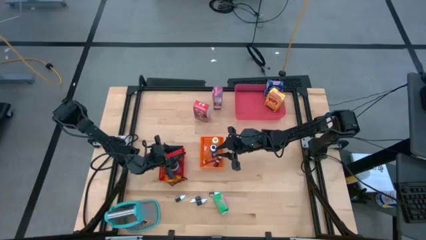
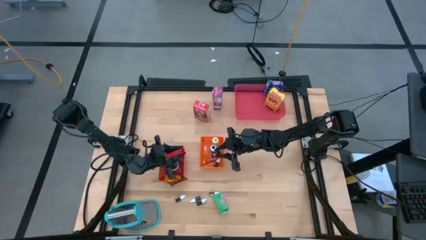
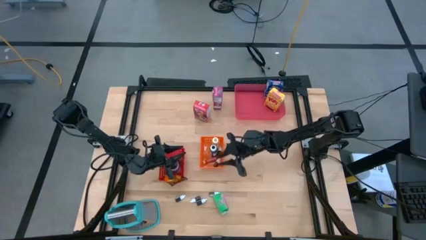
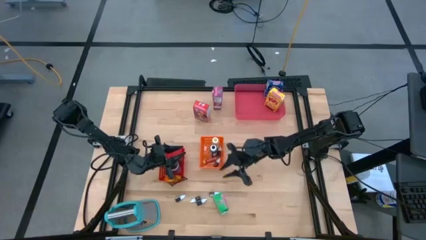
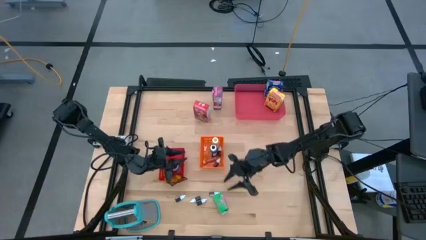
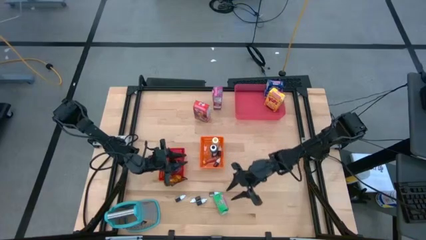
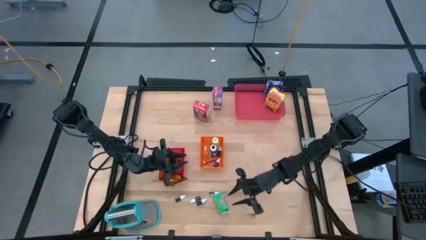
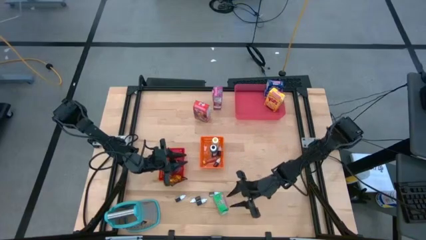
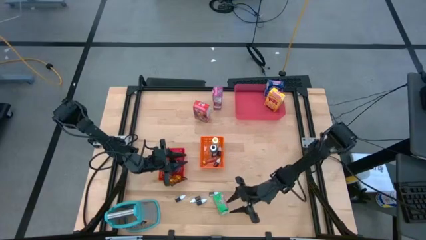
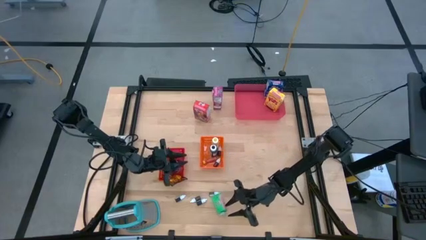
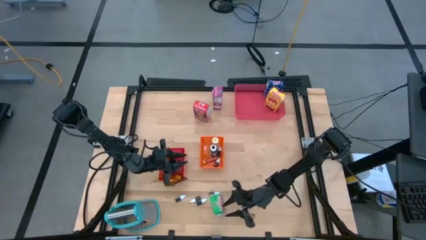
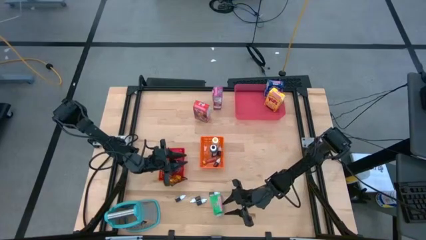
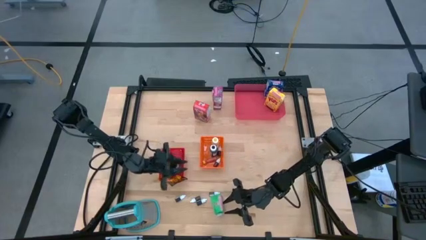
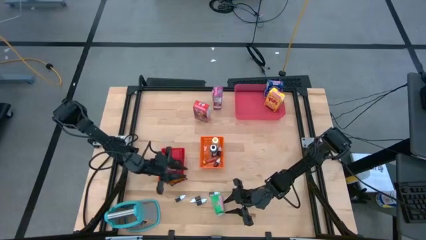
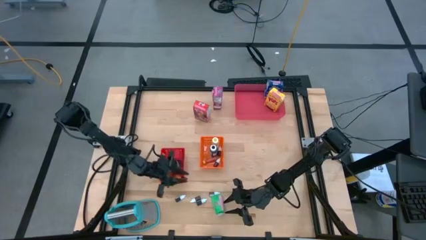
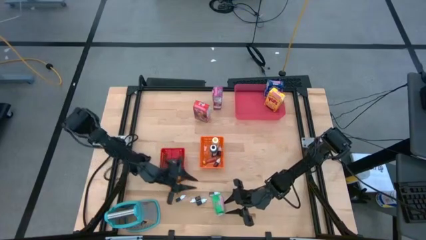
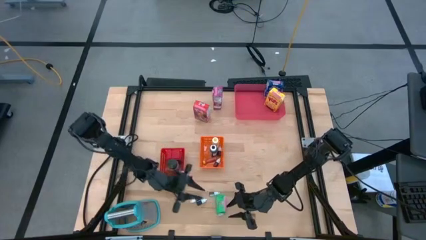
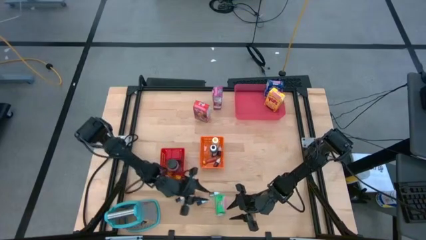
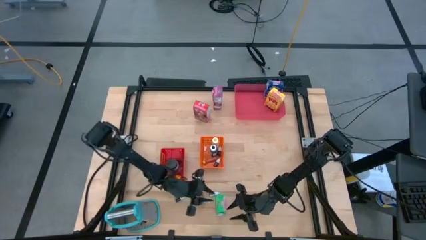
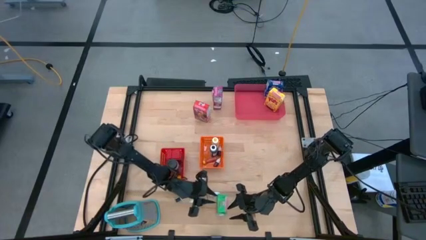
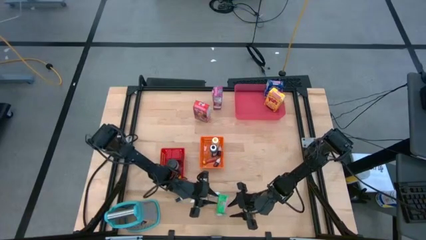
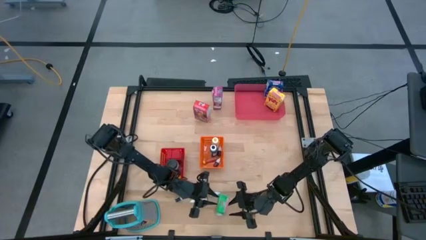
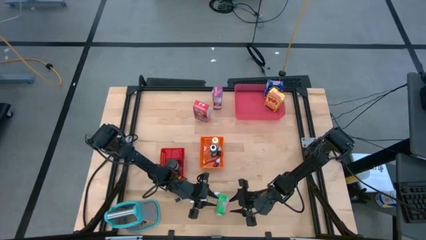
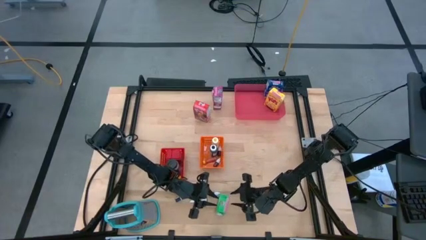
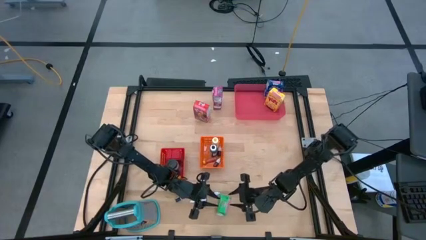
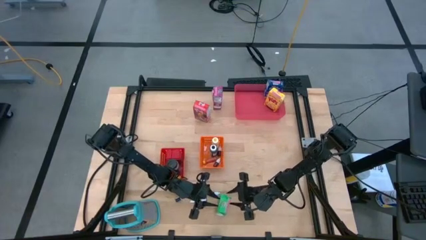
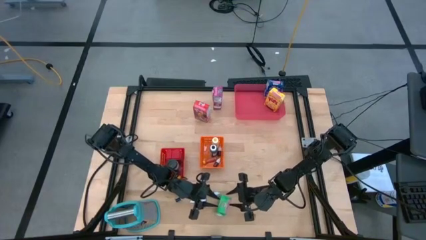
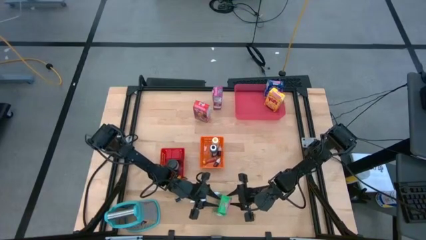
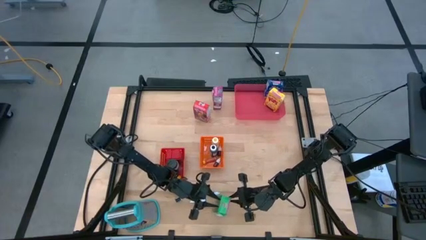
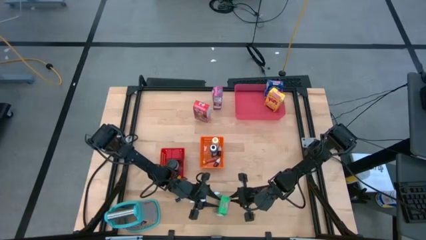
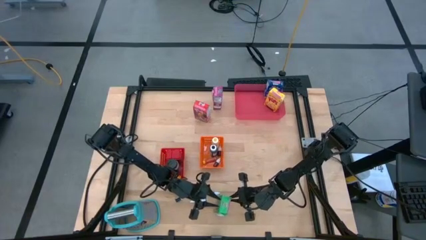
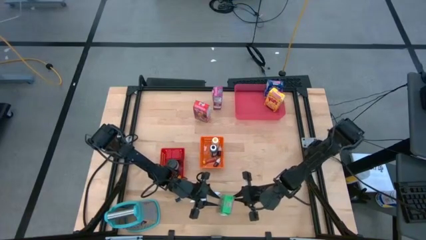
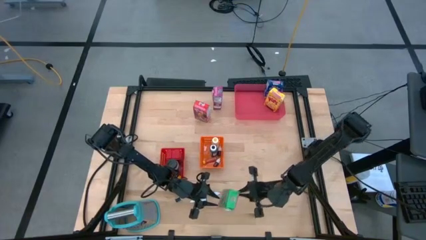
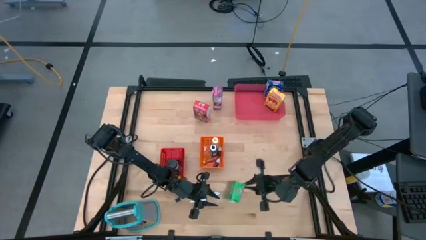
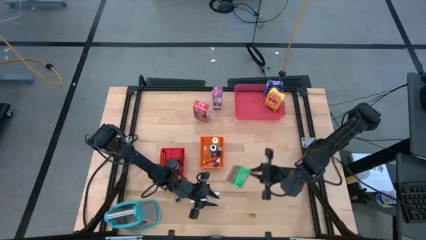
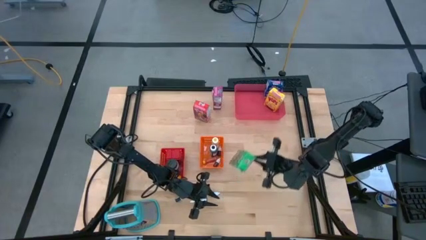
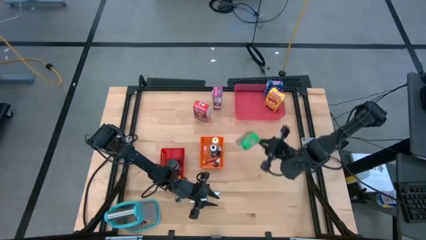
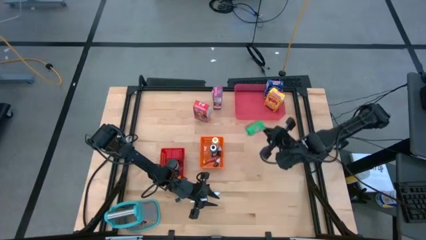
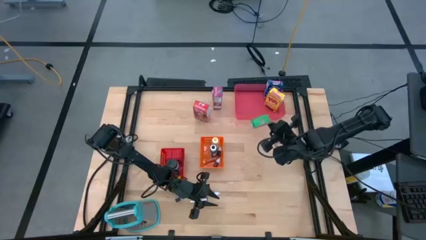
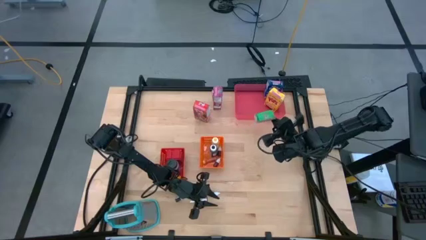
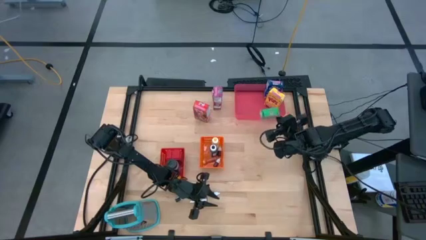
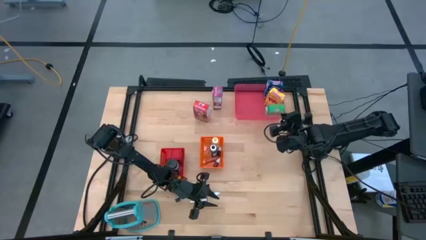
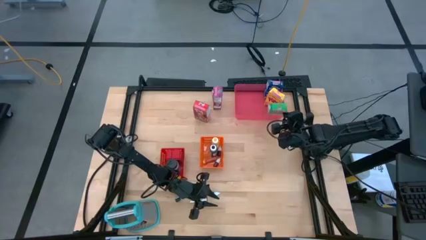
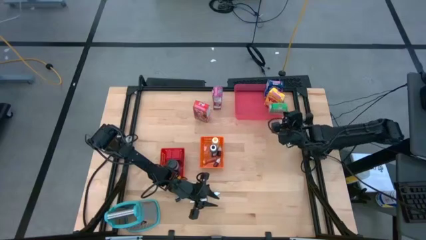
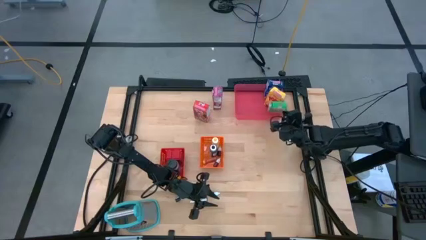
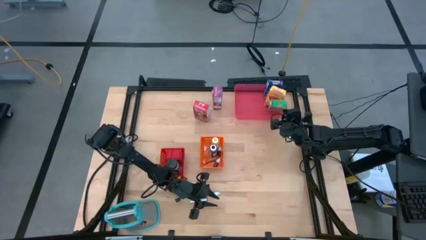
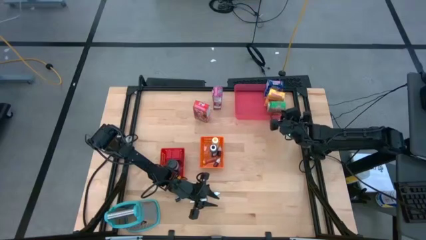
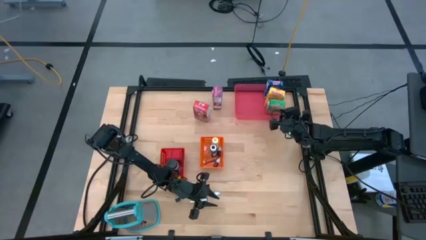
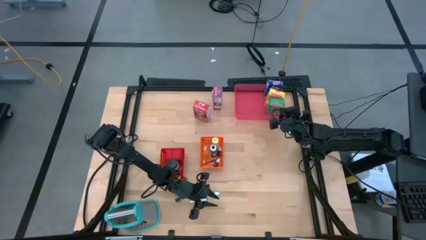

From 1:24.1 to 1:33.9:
Task: Pick & Place Kitchen Items
Put the green cereal box into the light red bin

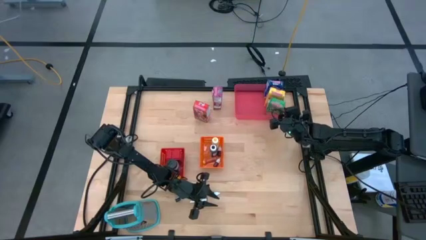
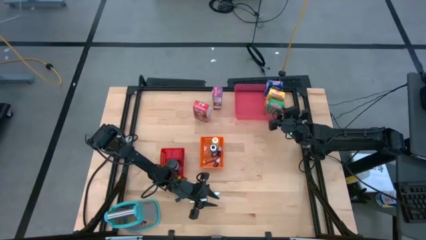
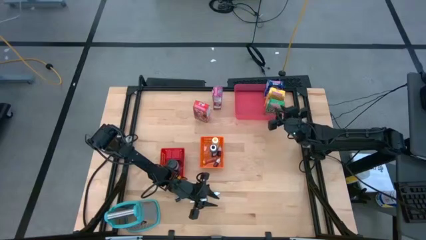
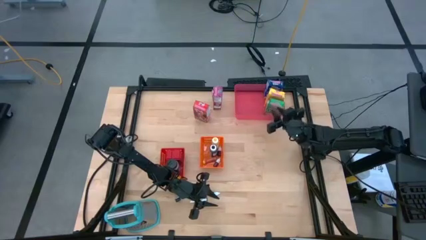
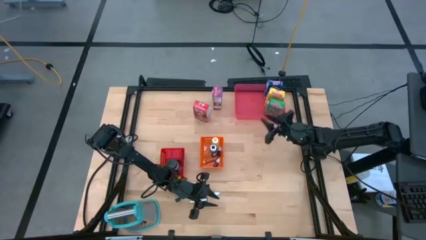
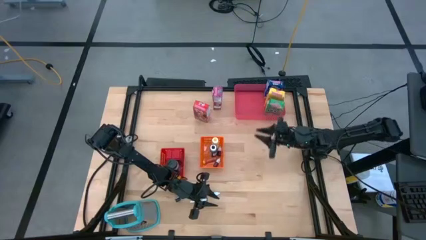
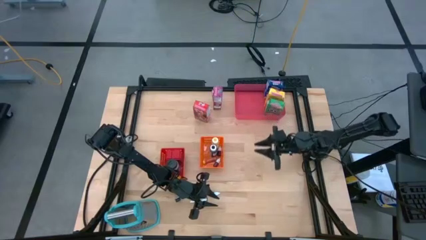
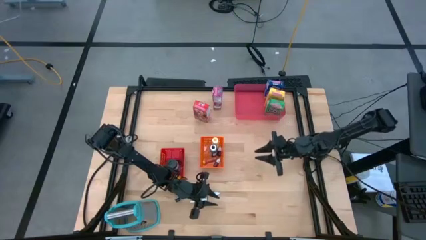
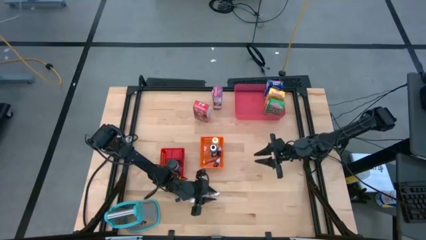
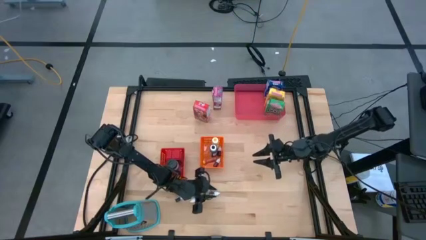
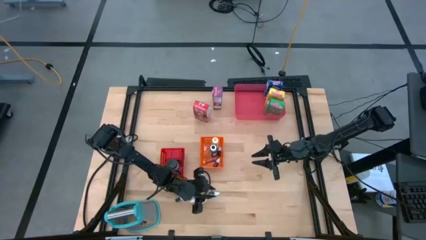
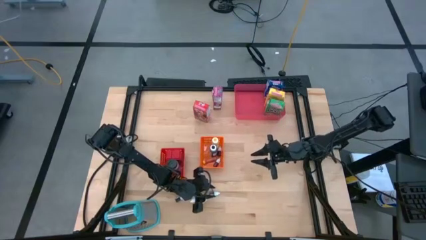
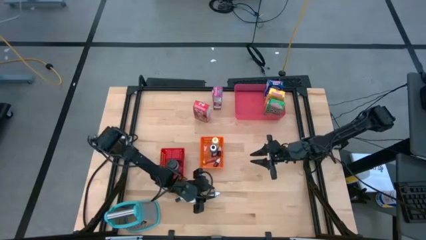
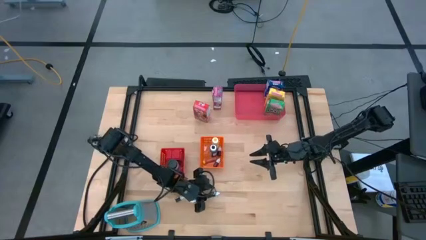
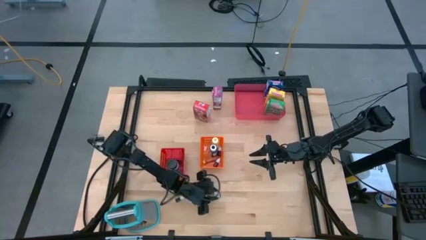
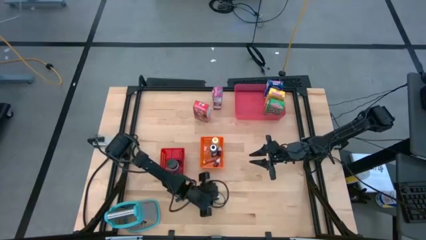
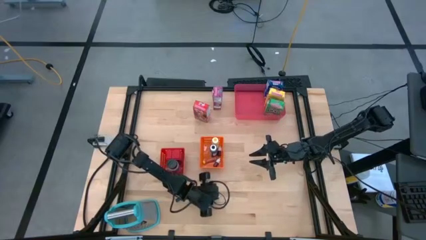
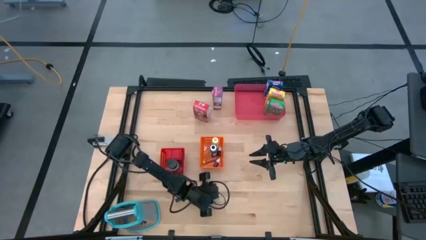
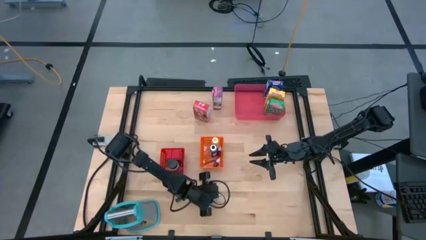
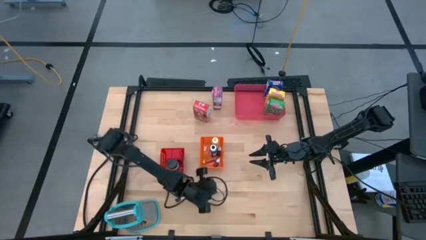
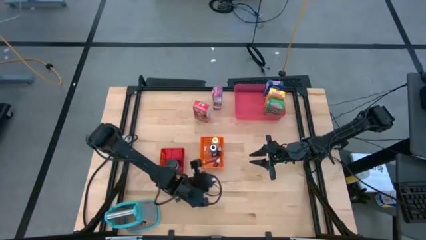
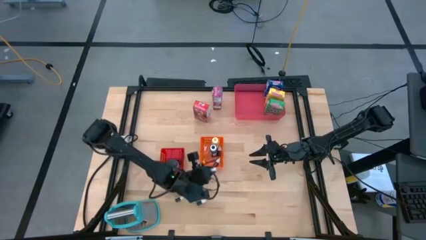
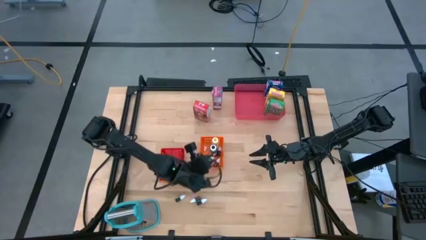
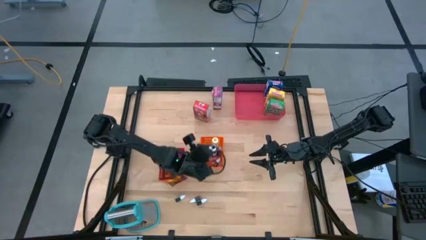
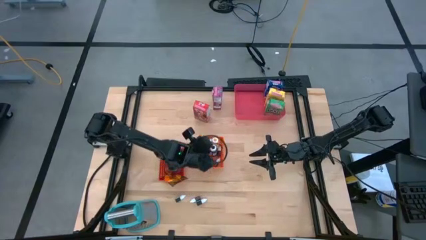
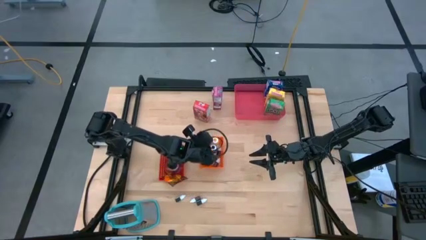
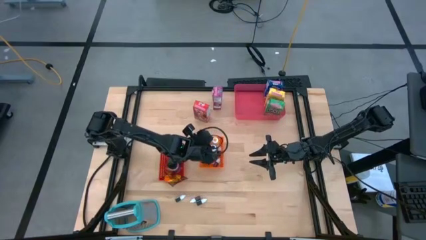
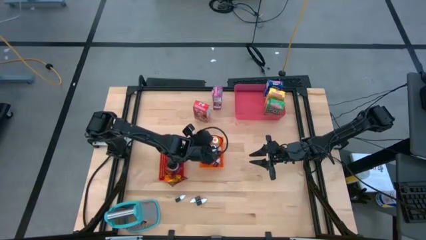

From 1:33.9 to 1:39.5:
Put the small right brown food coloring bottle into the orange bin
